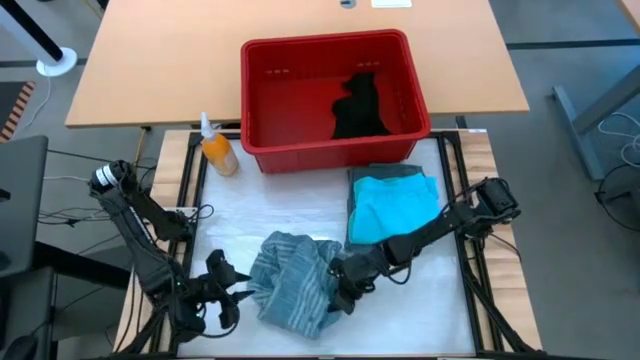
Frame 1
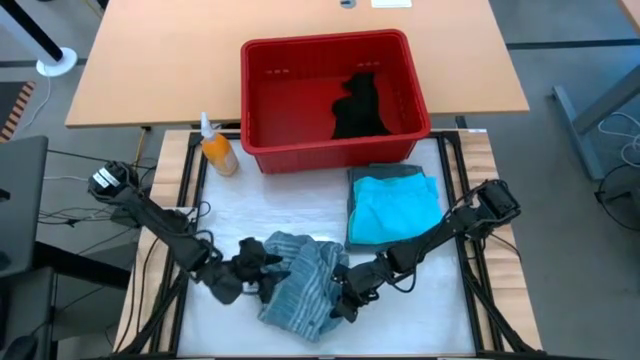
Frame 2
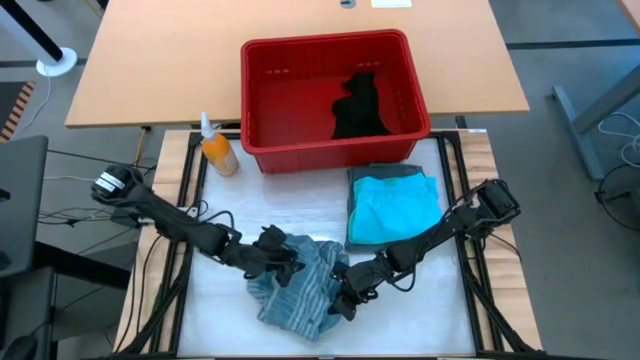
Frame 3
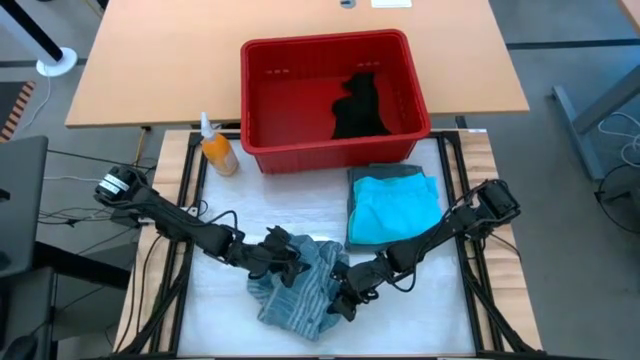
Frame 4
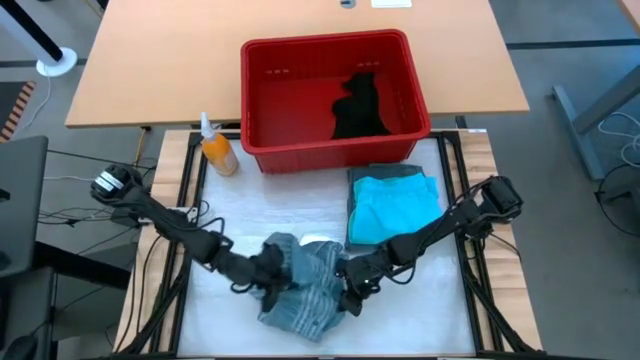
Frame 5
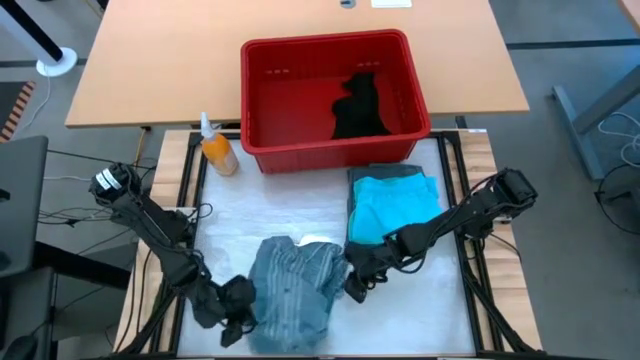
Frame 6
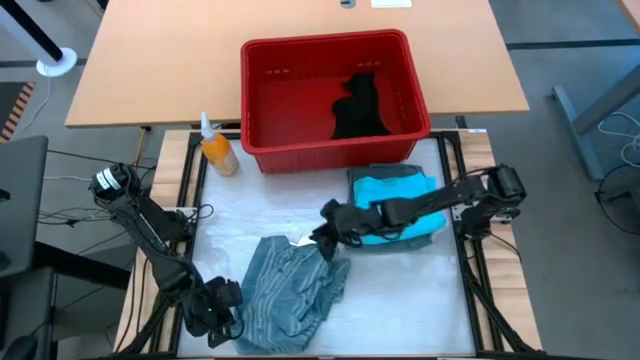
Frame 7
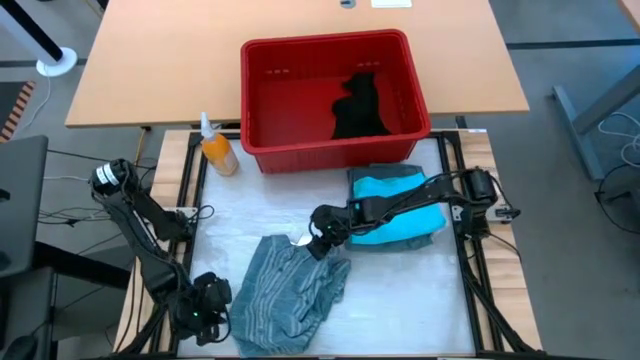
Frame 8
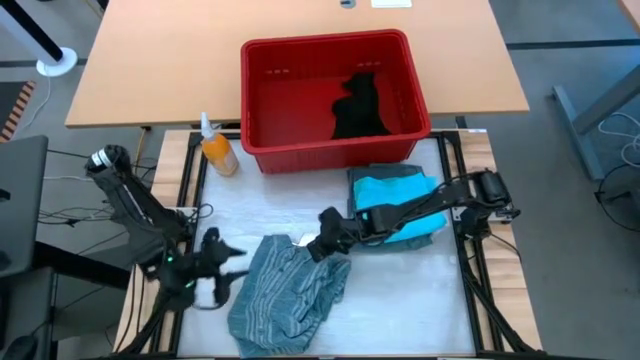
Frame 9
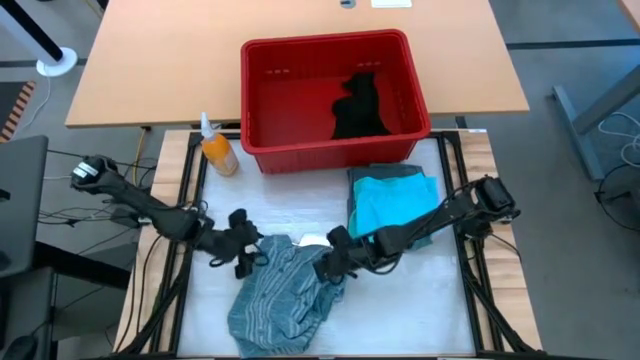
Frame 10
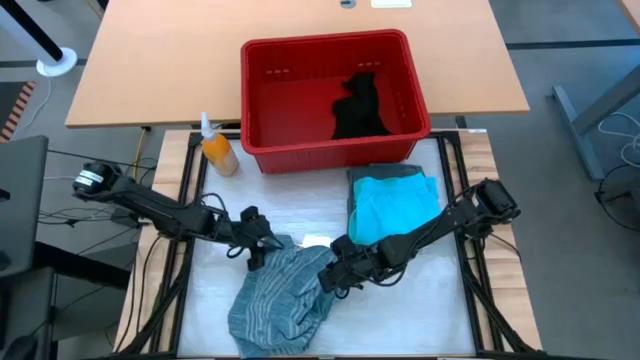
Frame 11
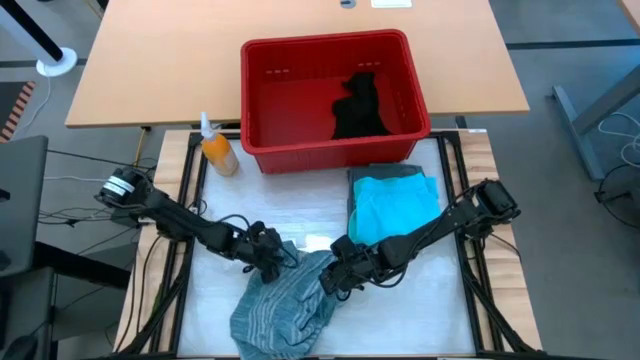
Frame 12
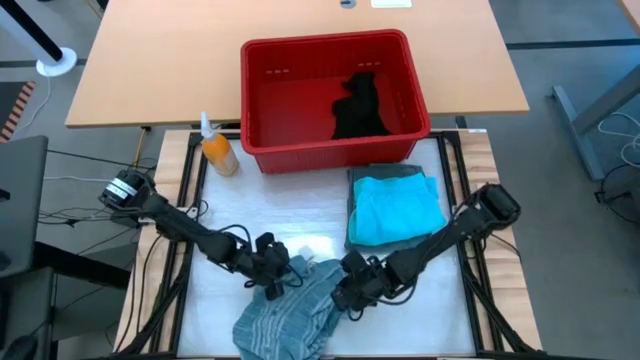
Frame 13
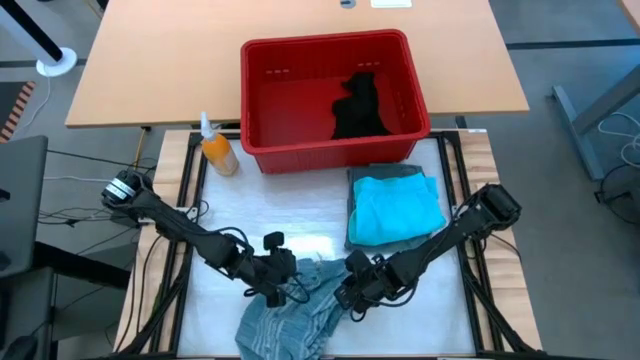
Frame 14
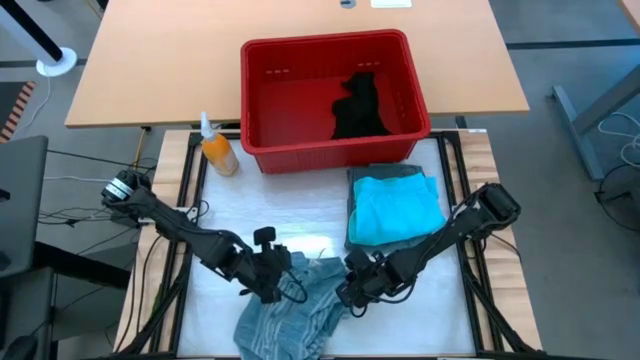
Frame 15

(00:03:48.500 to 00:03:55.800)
Task: Fold Laundry from Bin
Fold the blue patterned polo shirt

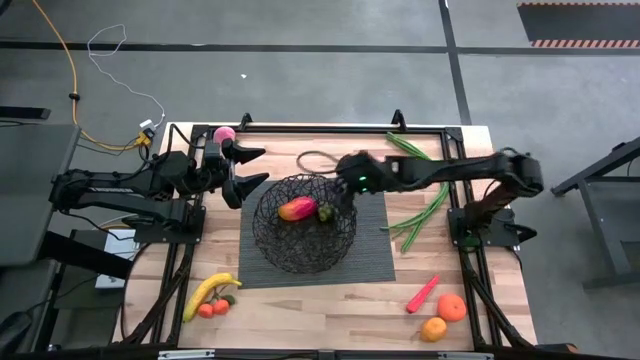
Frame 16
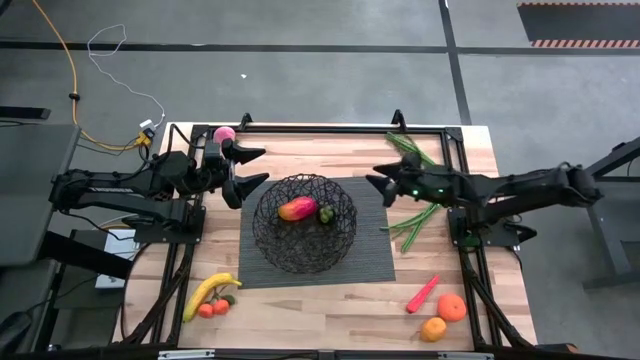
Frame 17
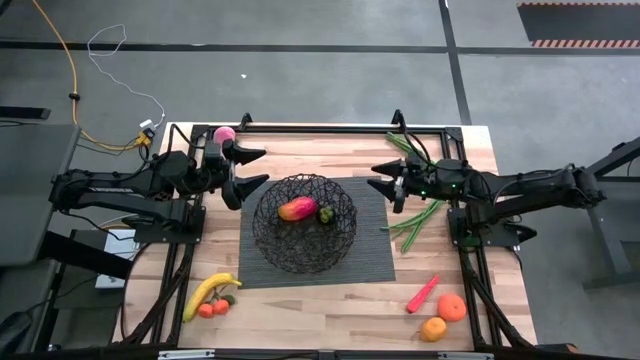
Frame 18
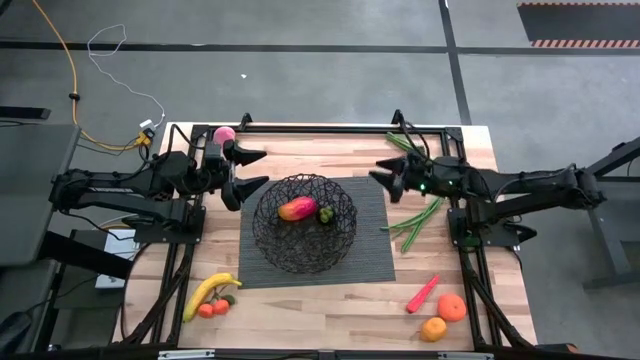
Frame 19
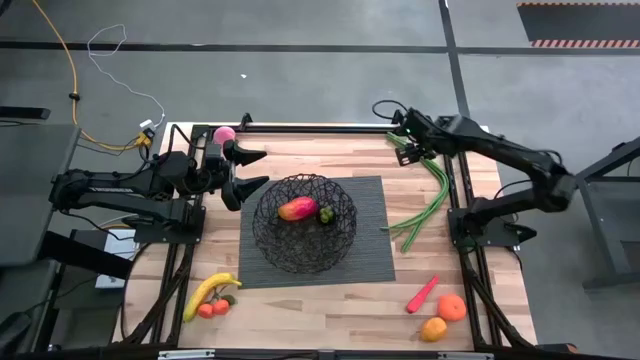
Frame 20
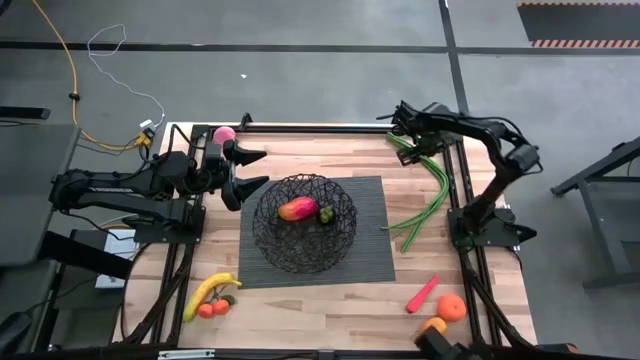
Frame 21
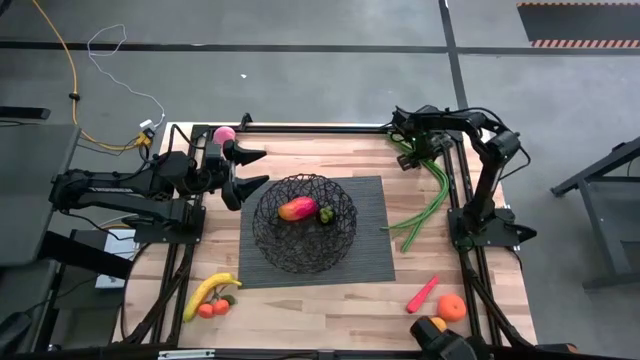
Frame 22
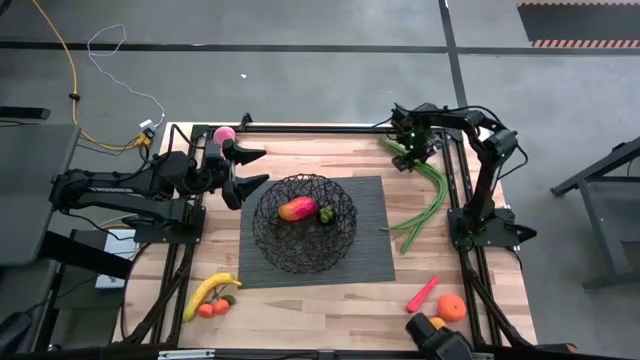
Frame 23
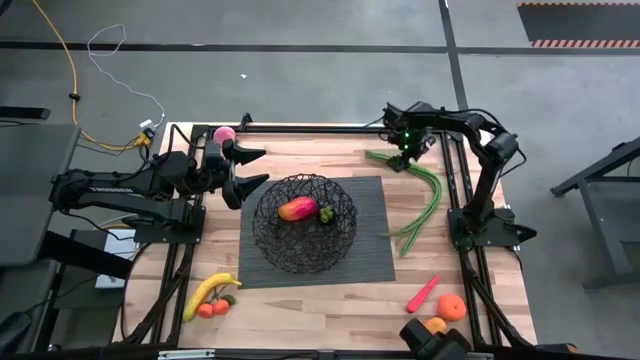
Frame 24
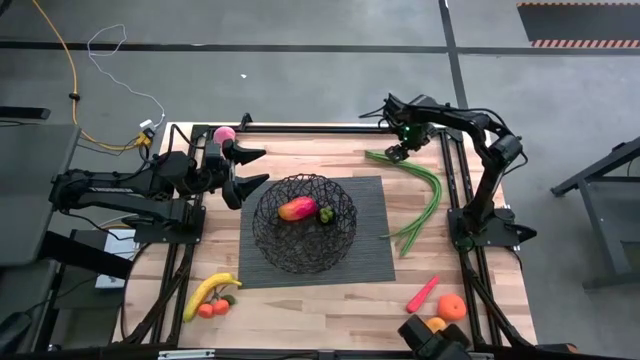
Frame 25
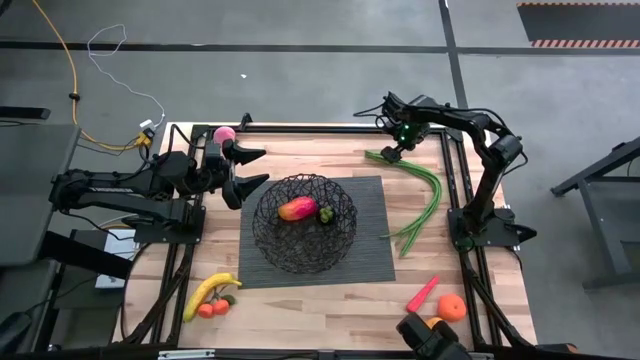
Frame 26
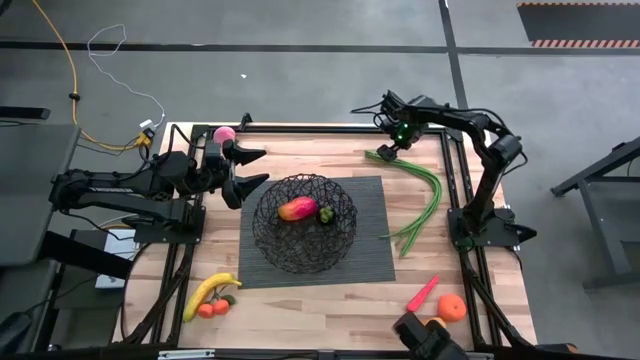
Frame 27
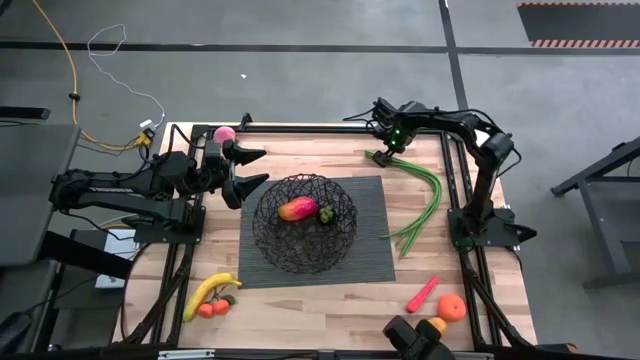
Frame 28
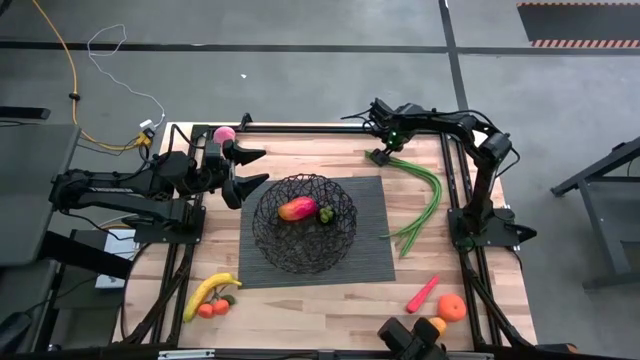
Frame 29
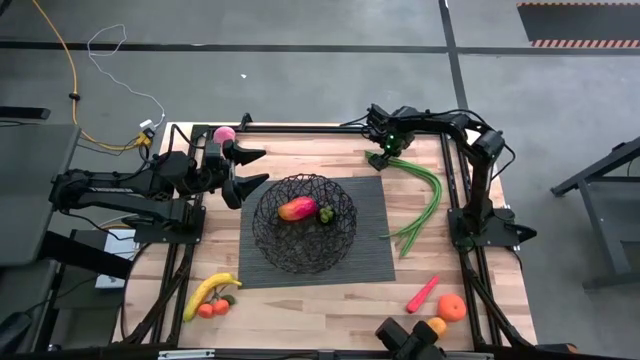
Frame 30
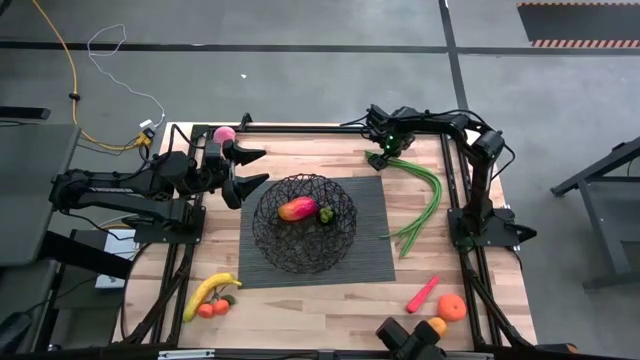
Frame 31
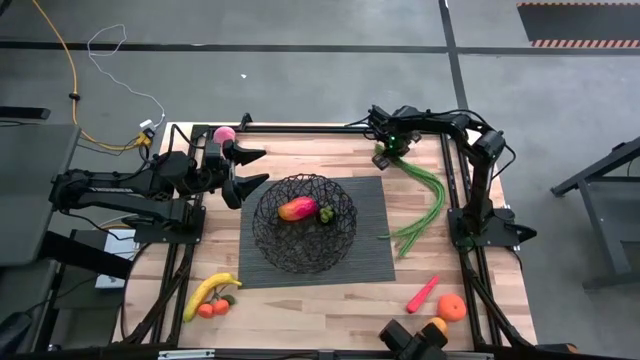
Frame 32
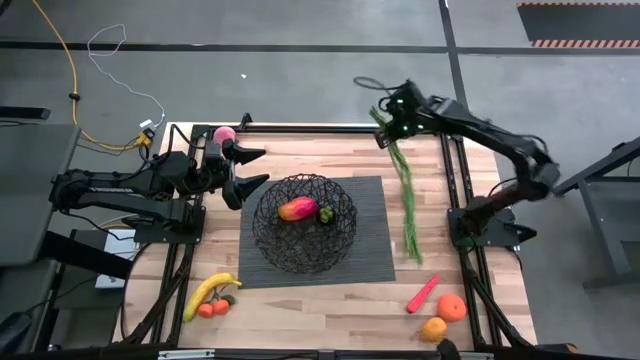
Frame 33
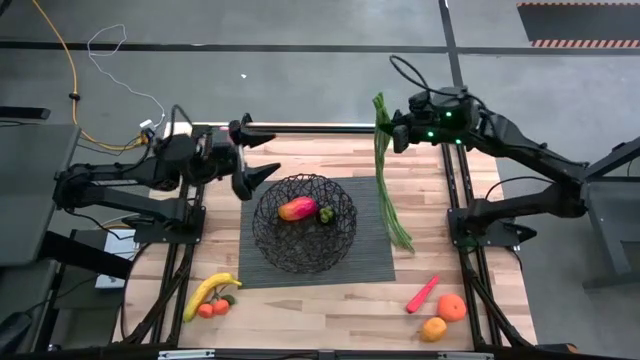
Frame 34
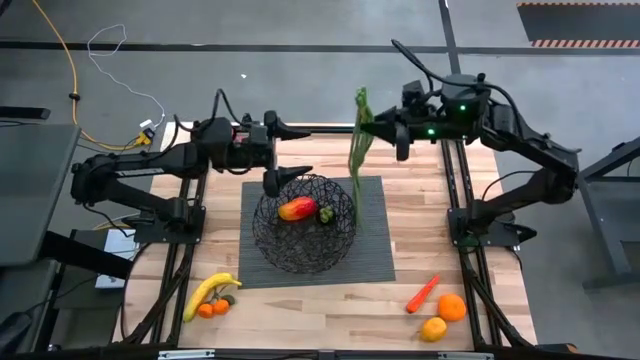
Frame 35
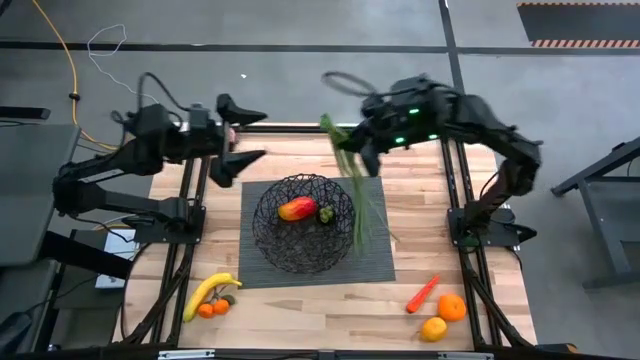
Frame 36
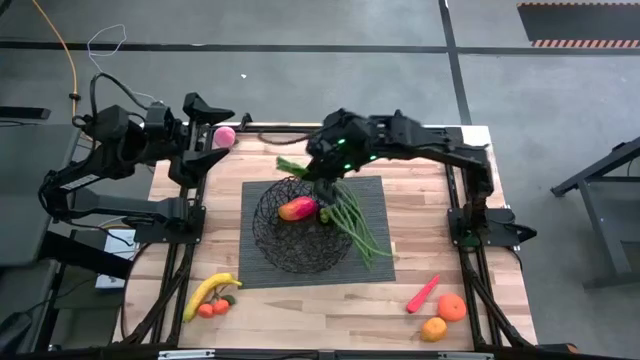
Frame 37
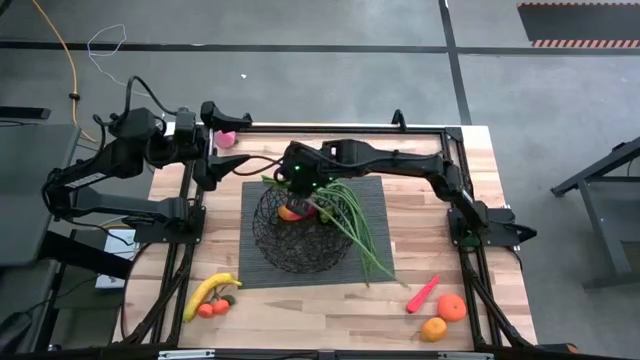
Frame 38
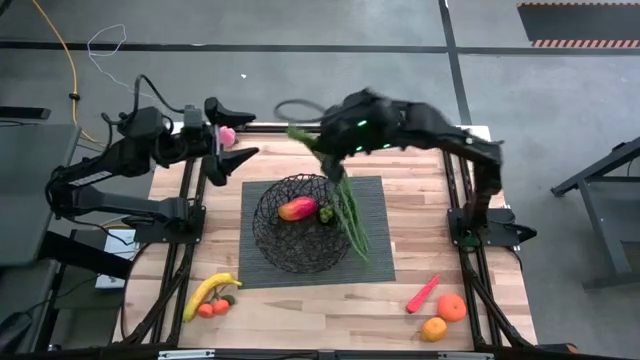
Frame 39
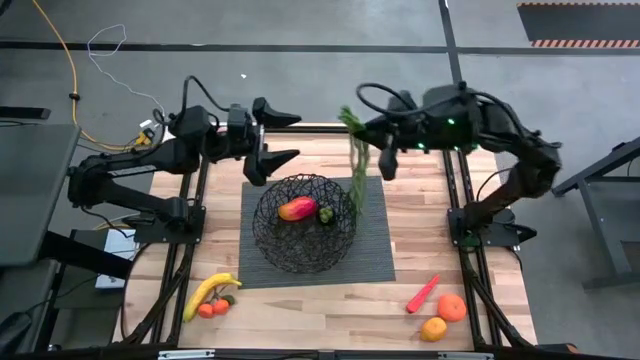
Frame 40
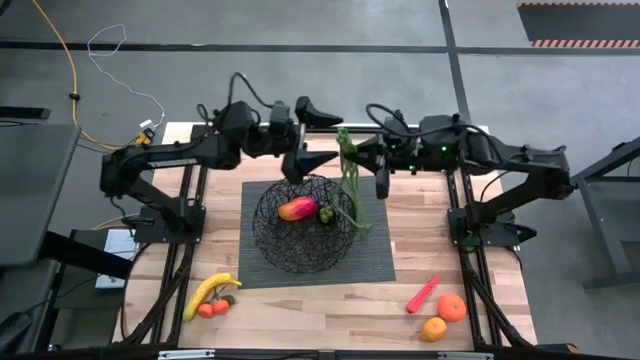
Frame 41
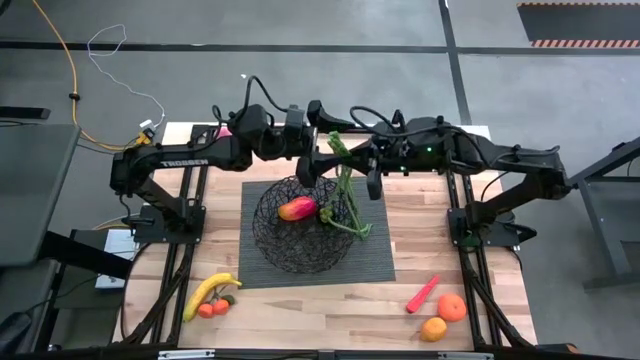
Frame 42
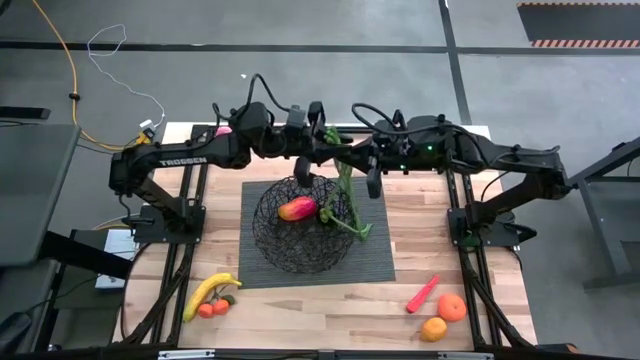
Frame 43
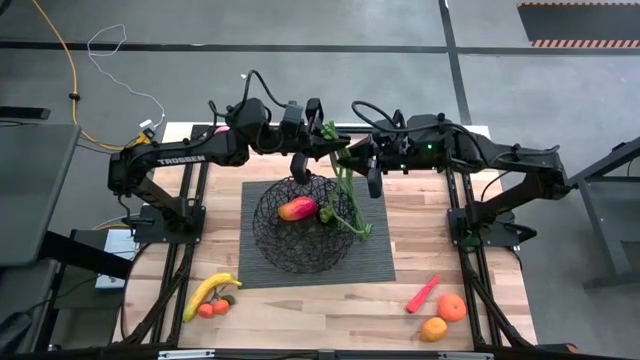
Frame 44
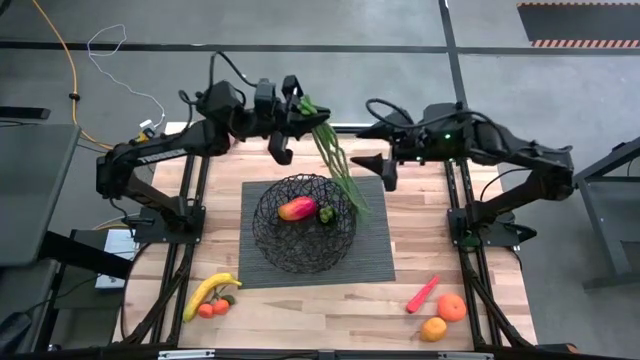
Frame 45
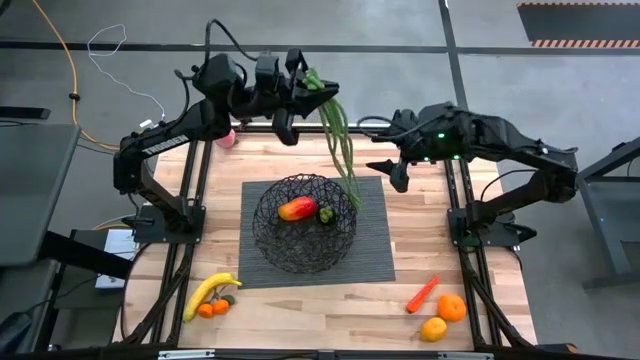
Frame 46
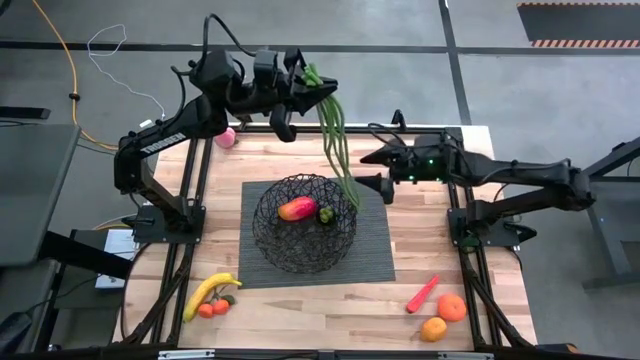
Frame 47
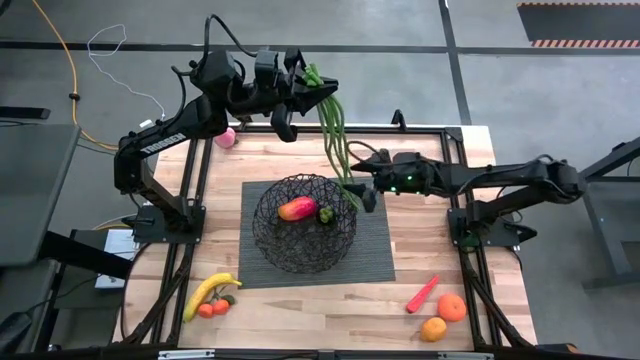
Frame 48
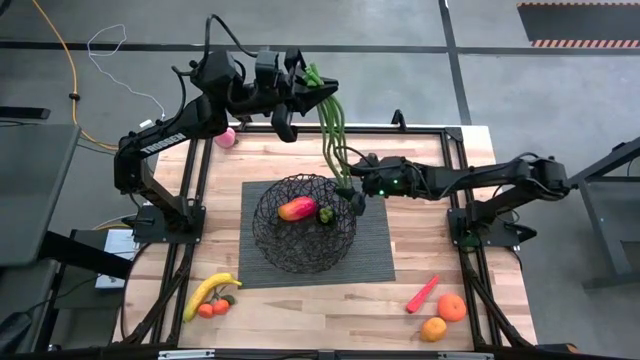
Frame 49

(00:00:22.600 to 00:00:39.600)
Task: Build produce basket
Put the green beans into the black mesh basket
